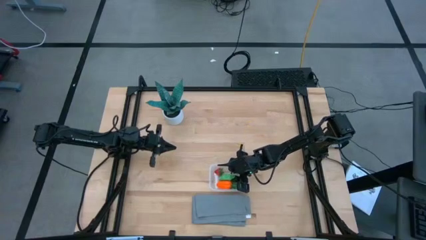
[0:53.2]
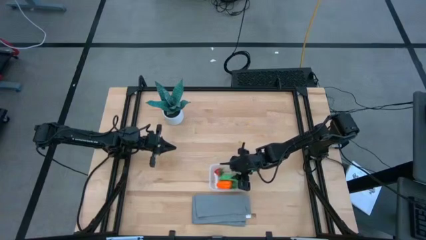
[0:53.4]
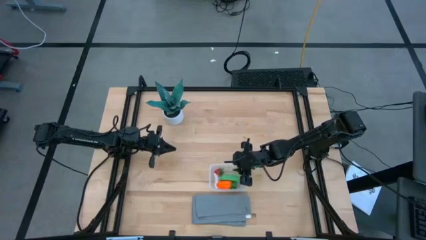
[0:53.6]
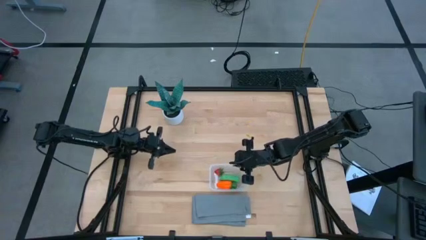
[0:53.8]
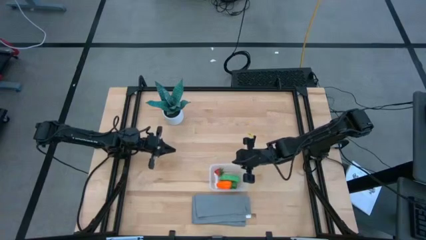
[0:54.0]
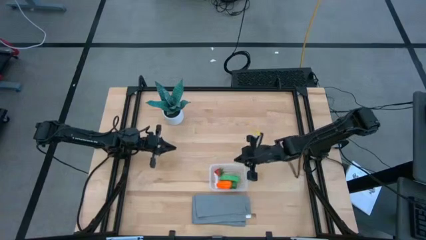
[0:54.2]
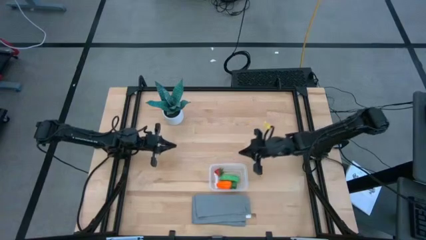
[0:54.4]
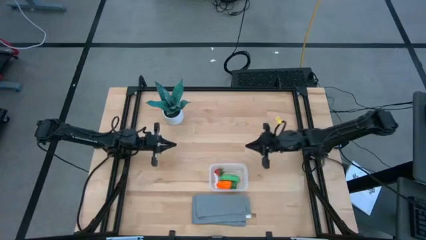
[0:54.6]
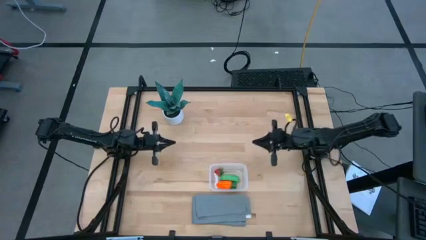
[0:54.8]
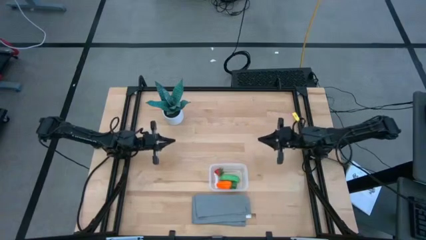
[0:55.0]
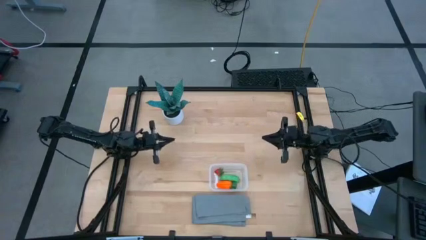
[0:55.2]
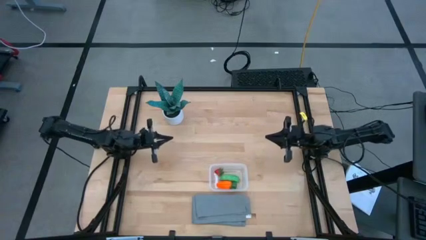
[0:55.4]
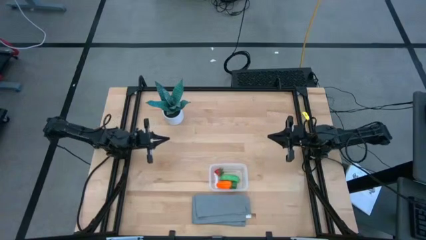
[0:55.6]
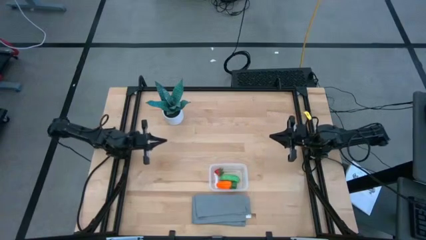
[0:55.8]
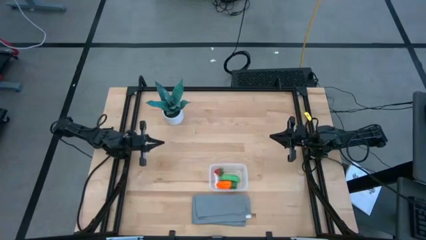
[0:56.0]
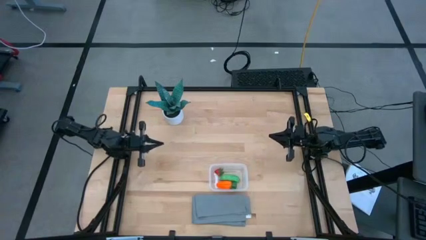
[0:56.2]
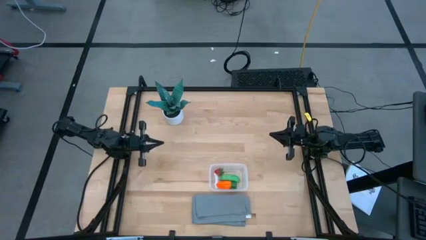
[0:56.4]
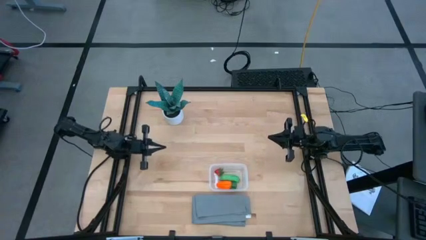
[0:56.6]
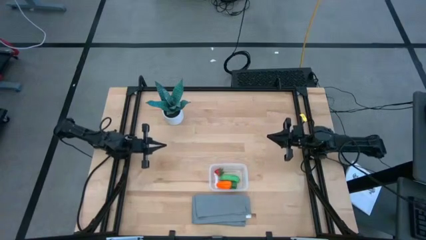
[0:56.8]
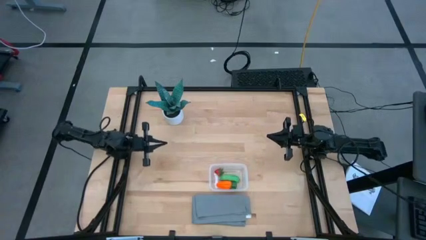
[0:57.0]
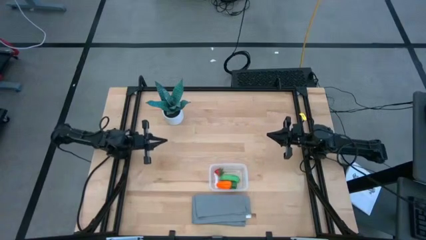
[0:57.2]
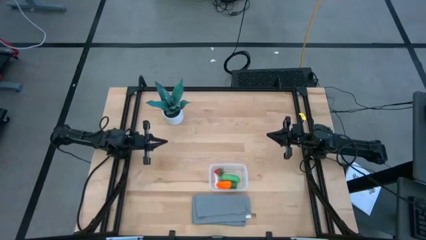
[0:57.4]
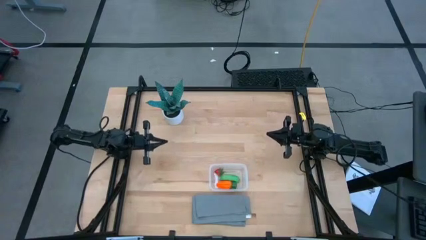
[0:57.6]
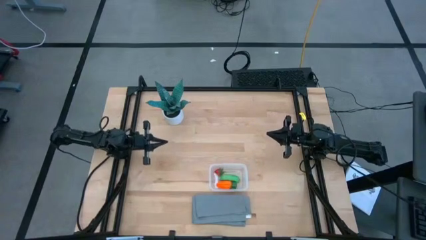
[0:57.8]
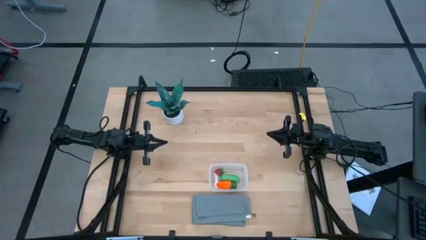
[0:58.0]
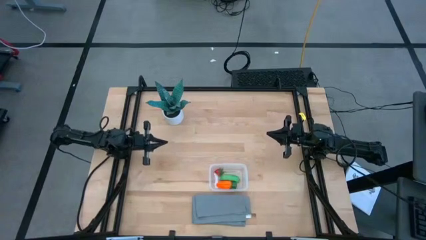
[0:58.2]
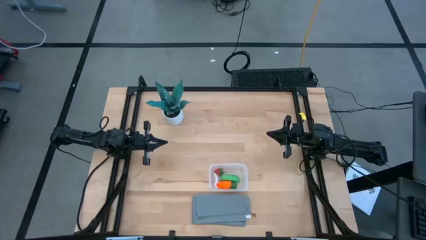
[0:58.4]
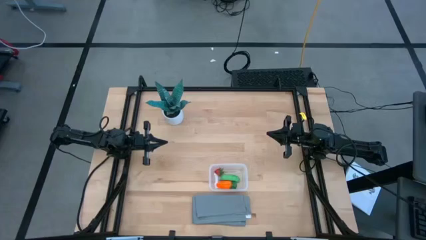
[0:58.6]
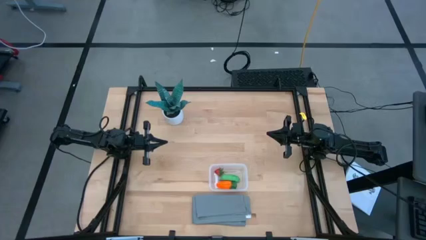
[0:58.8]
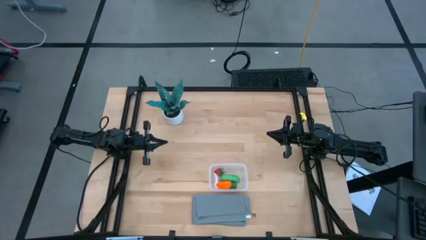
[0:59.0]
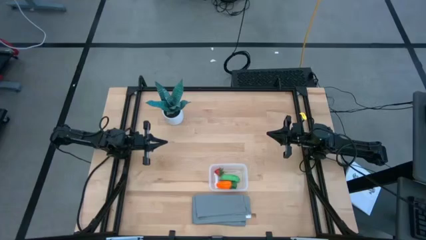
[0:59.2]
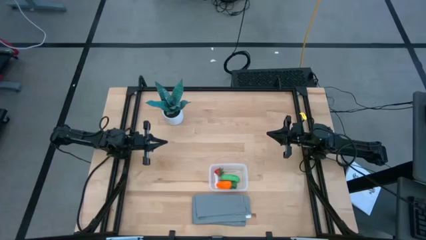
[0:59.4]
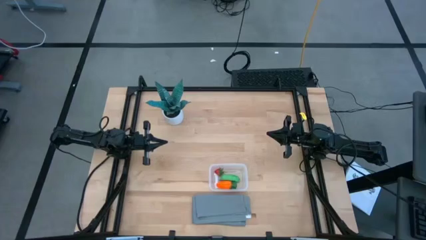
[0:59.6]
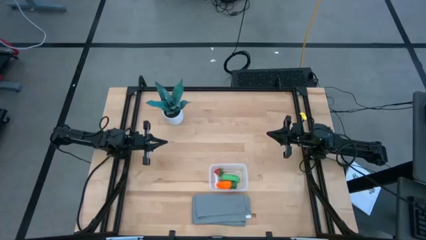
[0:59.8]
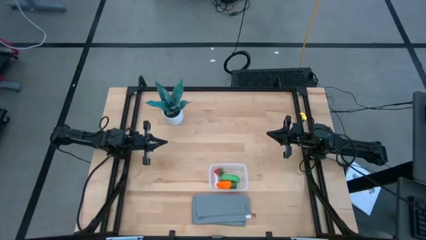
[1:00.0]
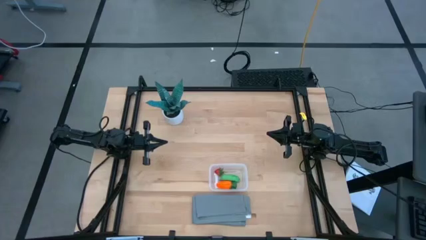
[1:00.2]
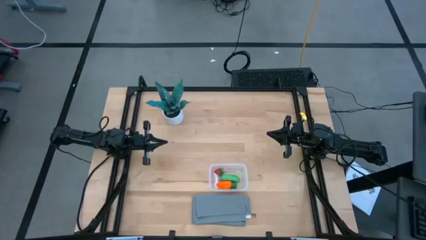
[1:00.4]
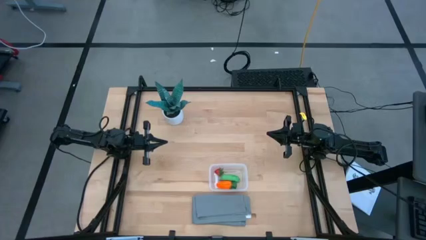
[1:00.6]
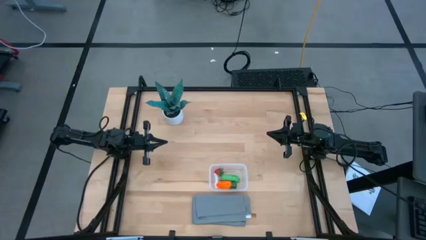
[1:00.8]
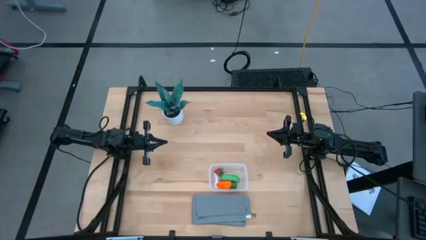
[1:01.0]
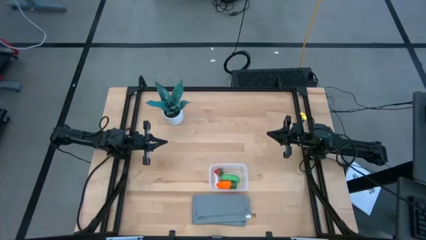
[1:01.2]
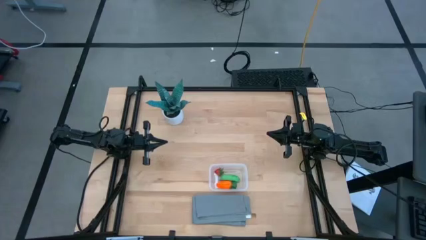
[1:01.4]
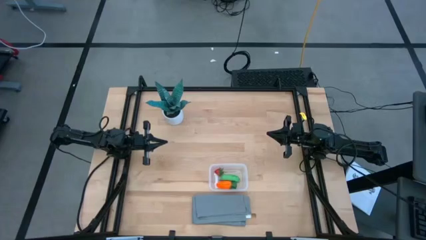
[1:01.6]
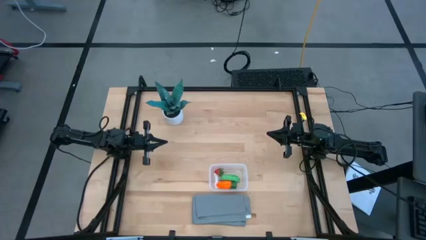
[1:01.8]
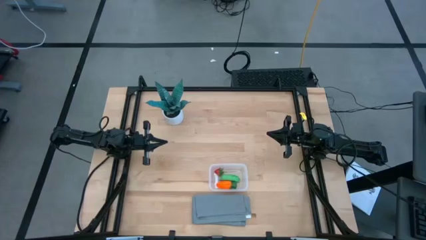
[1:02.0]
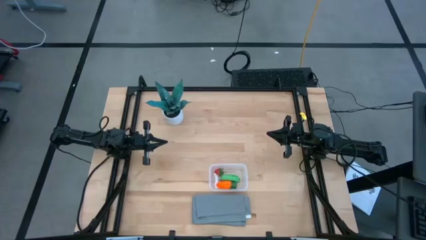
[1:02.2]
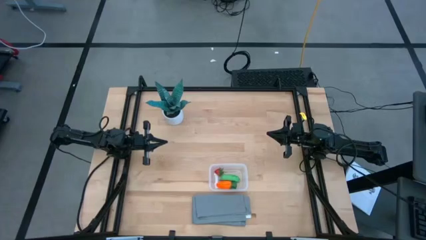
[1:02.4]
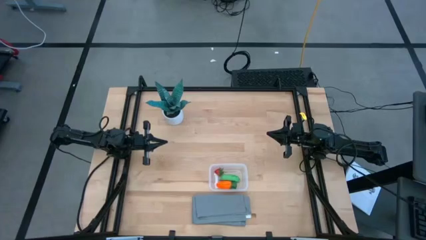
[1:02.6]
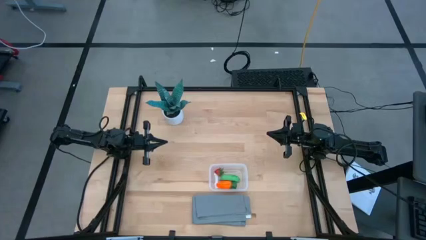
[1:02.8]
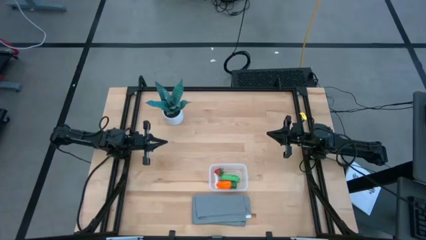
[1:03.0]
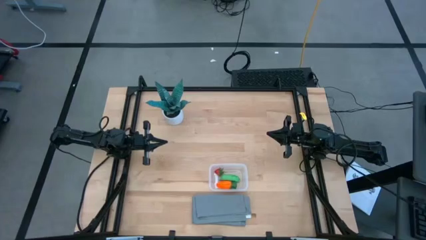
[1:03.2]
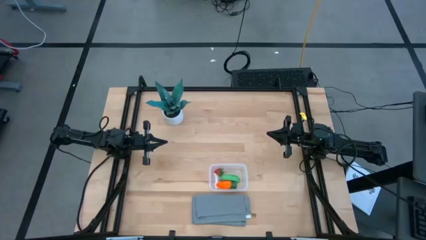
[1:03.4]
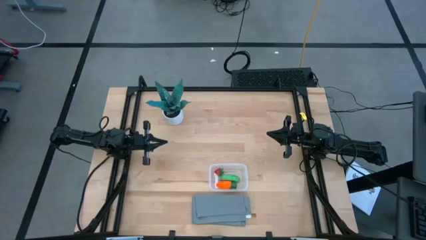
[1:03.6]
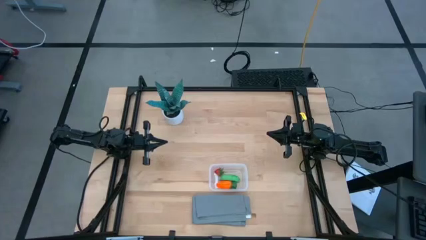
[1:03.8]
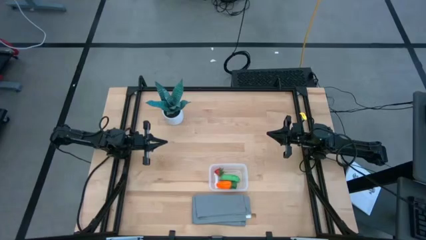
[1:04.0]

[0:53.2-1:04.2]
Task: Pick and placing Produce into tupperware
Return to Home Position

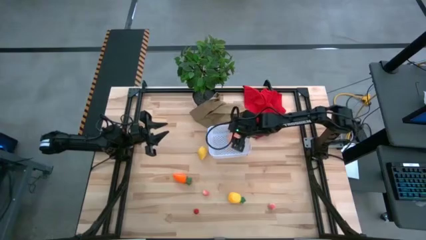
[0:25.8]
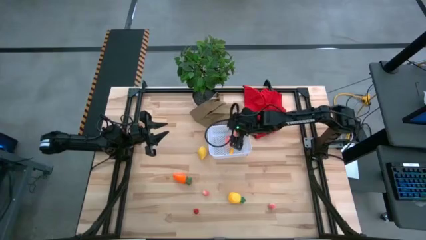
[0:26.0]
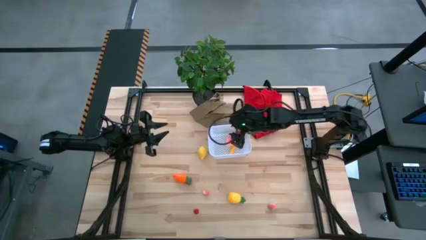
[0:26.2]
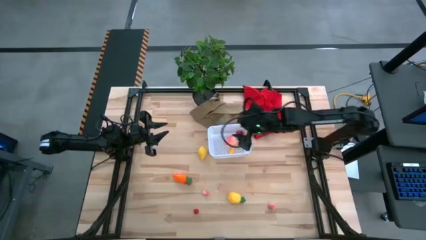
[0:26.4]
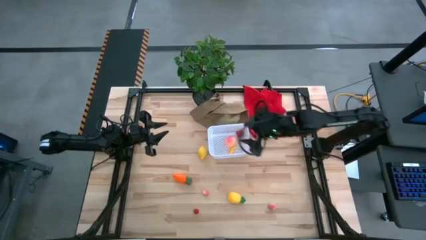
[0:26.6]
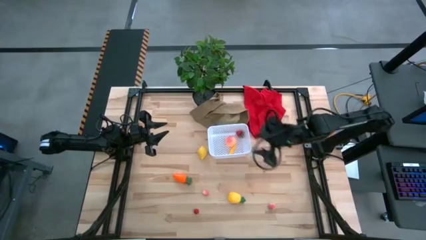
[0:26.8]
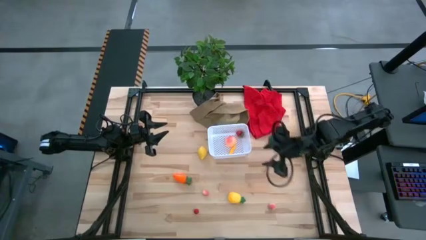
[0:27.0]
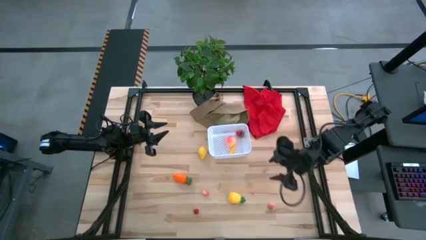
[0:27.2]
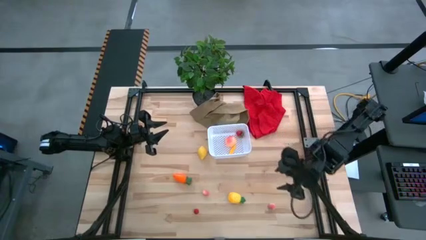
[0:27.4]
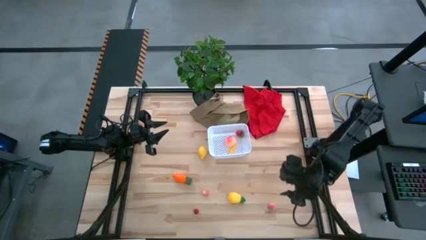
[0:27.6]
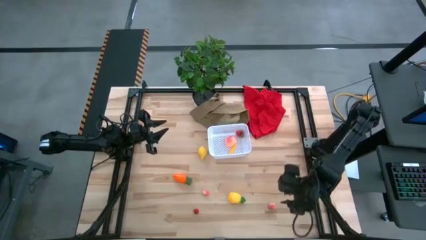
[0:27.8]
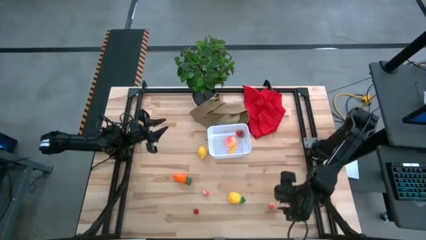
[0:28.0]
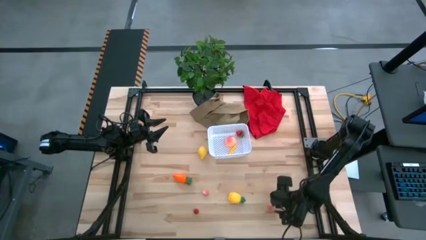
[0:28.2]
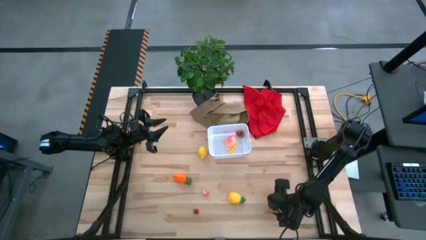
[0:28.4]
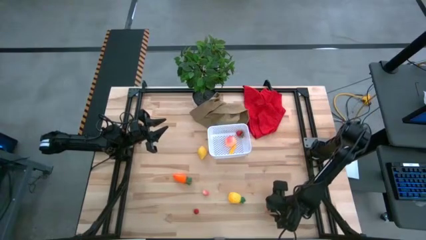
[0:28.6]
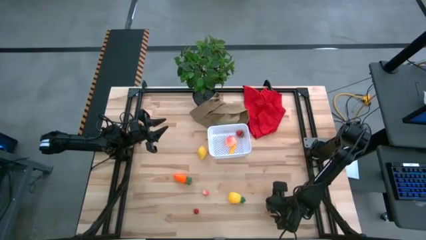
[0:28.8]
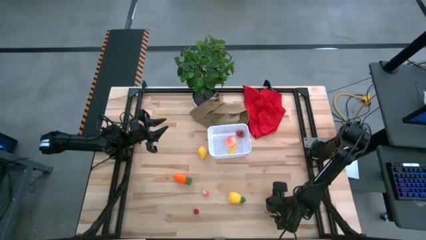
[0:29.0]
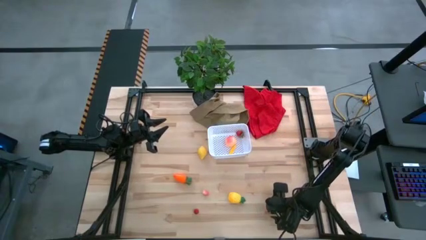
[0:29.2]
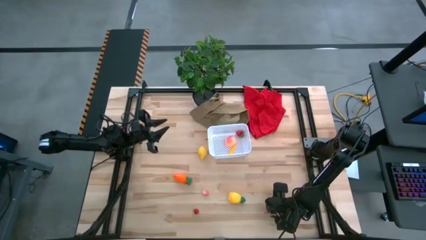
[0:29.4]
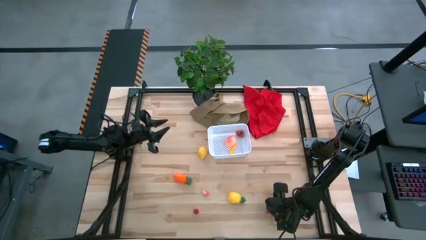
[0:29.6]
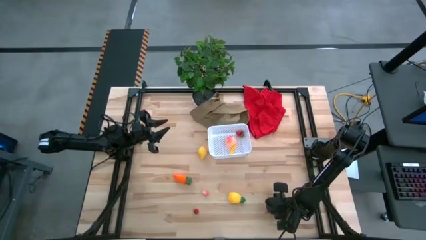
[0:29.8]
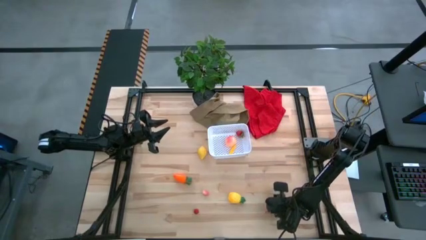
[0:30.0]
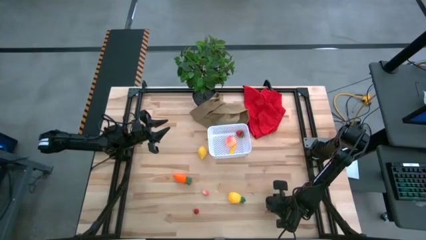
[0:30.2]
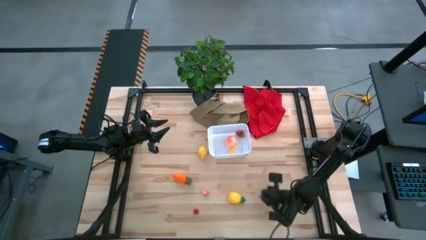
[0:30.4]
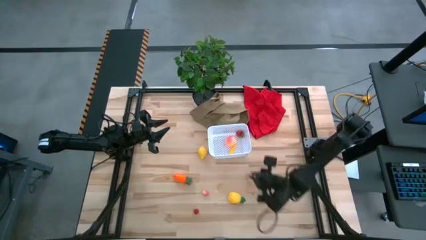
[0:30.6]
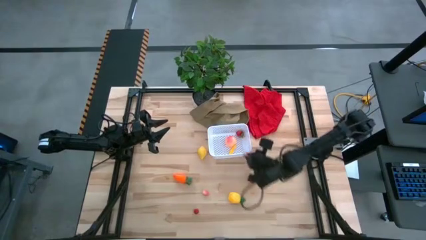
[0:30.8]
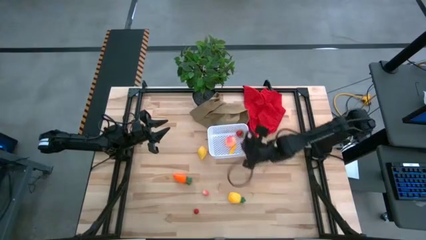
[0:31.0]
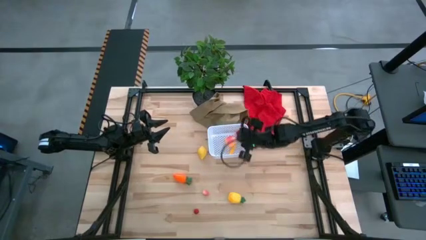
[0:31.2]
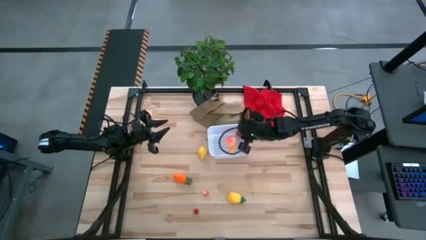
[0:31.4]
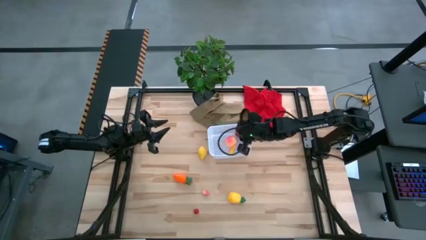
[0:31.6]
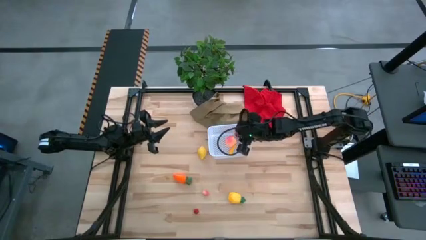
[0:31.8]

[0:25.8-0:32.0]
Task: Pick and placing Produce into tupperware
Put the right pink peach into the bin

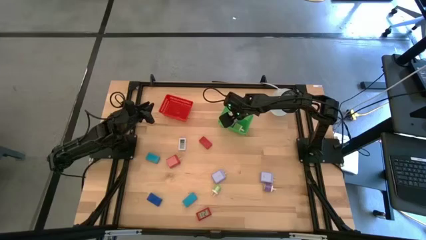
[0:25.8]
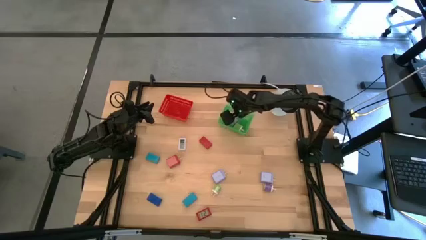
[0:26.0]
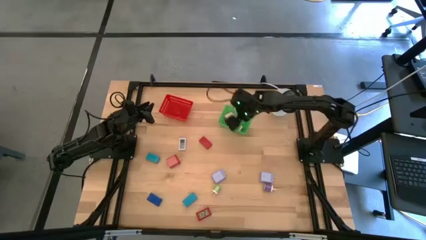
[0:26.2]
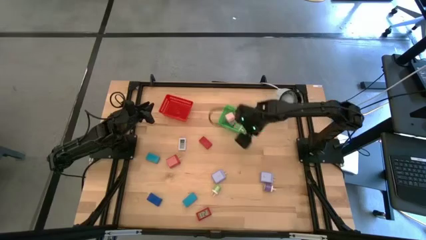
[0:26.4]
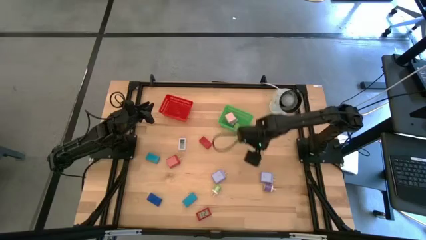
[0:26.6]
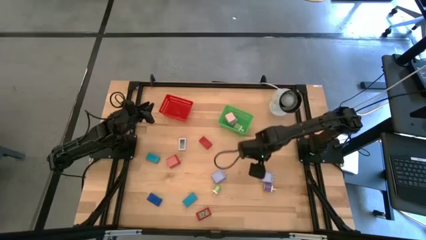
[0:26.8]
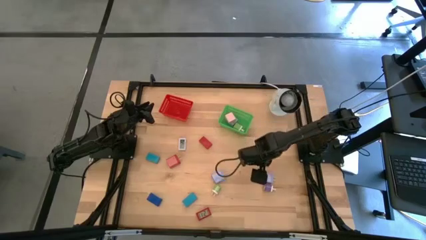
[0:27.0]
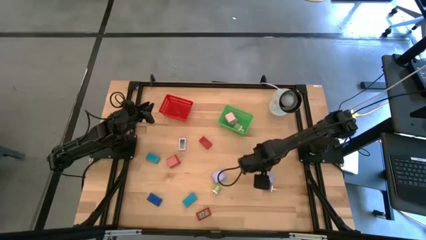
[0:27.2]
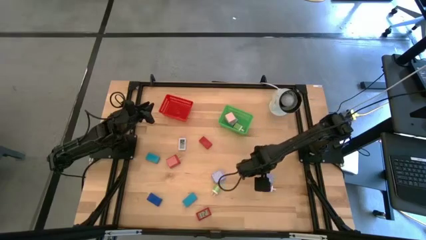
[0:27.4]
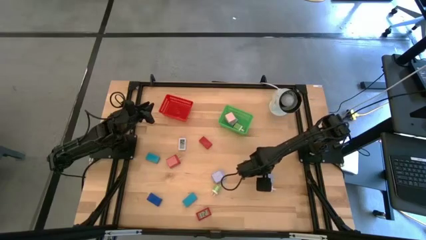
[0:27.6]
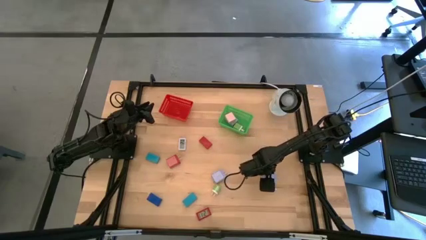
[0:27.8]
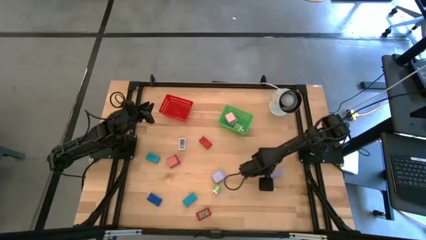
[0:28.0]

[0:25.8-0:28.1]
Task: Pick & Place Office items
Put the right light violet charger adapter into the green bin
